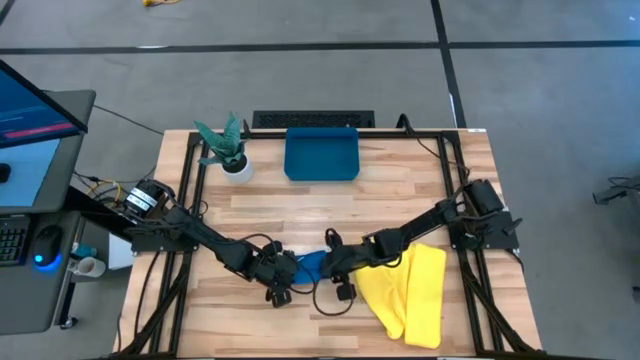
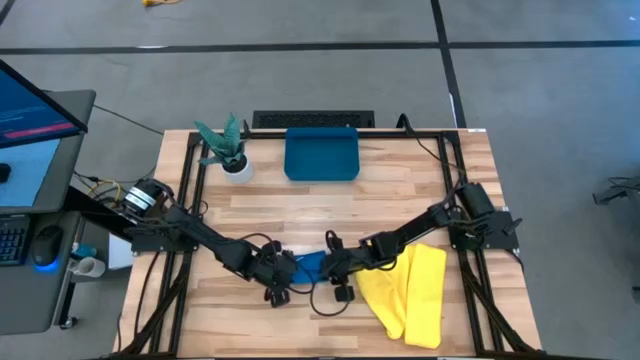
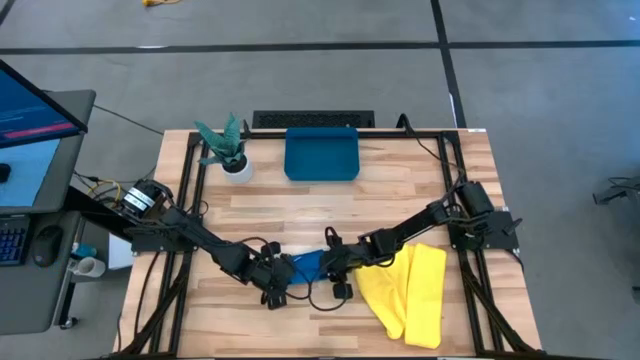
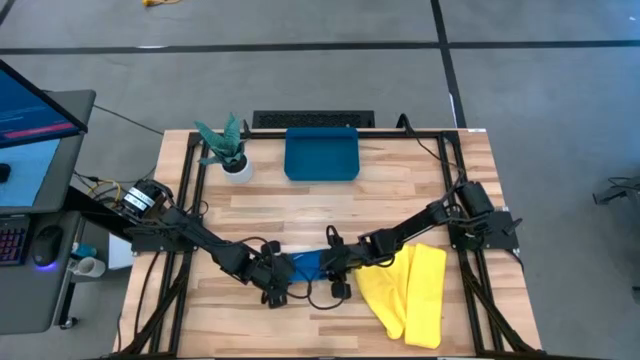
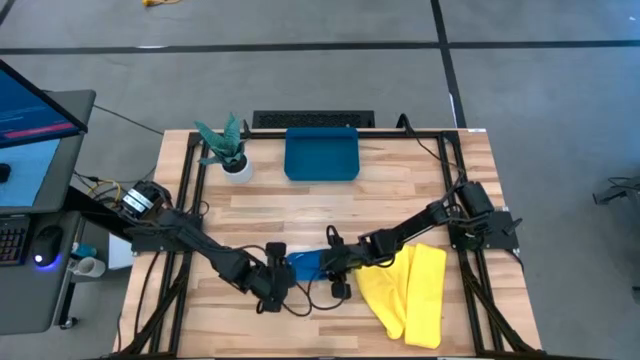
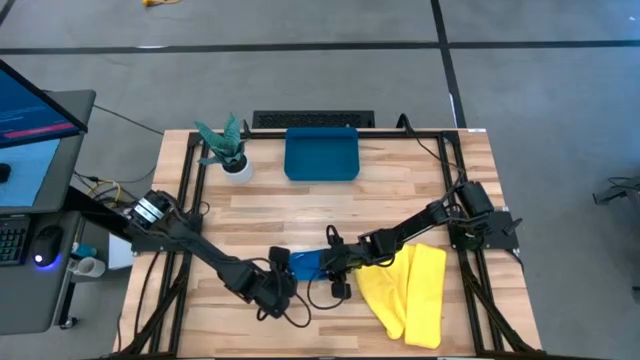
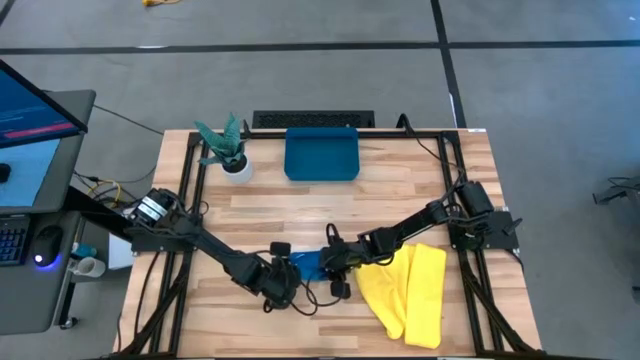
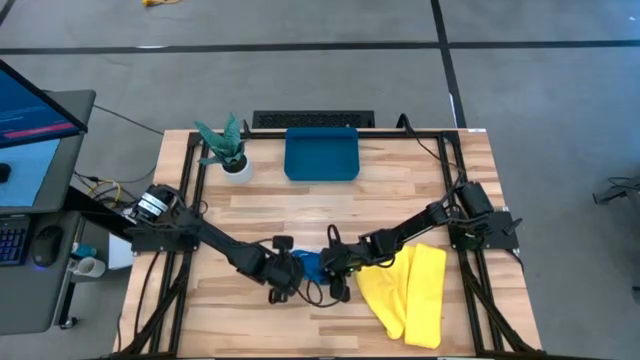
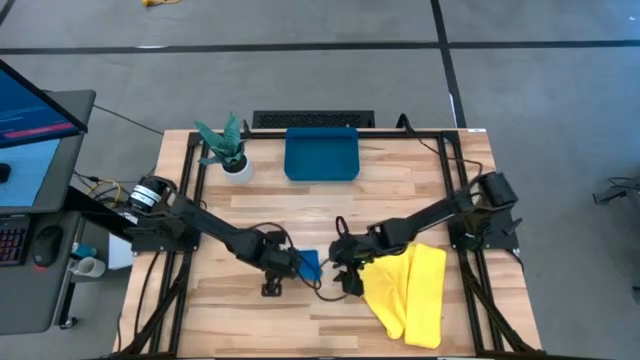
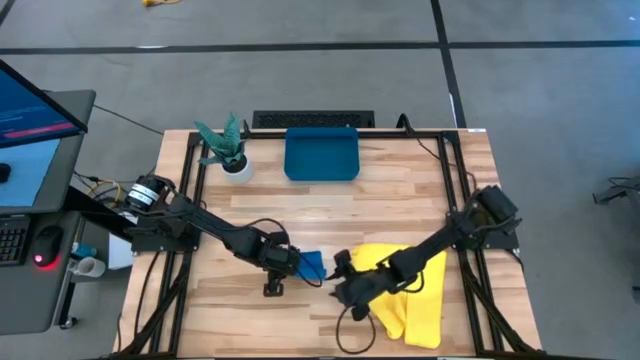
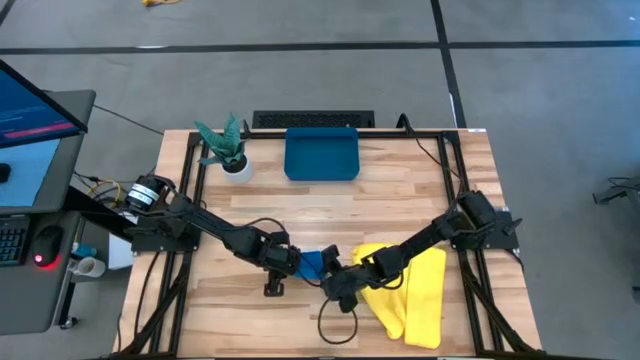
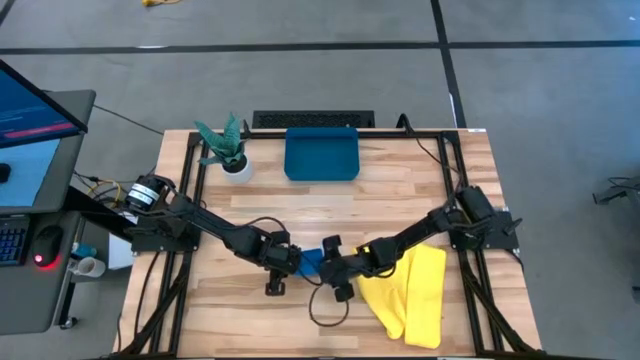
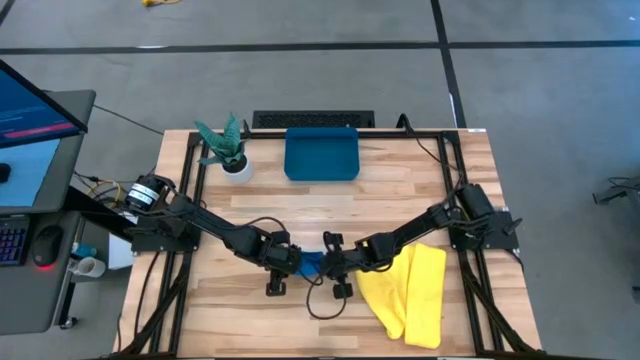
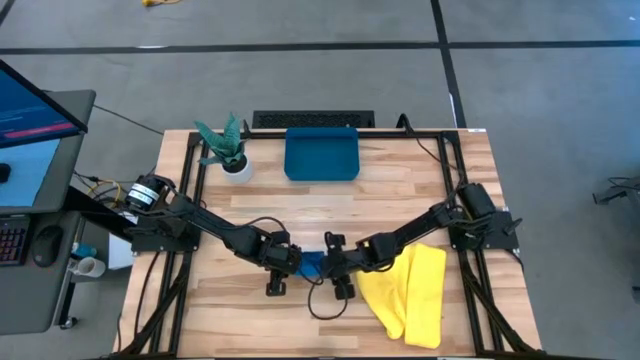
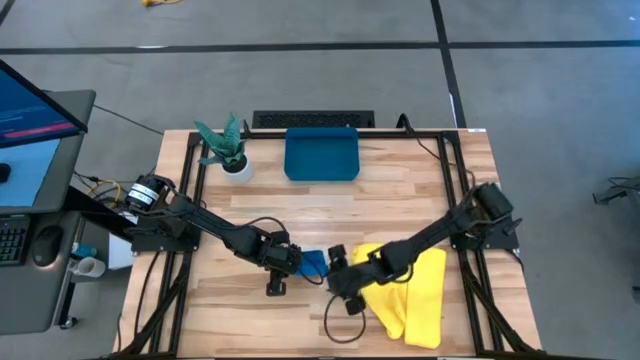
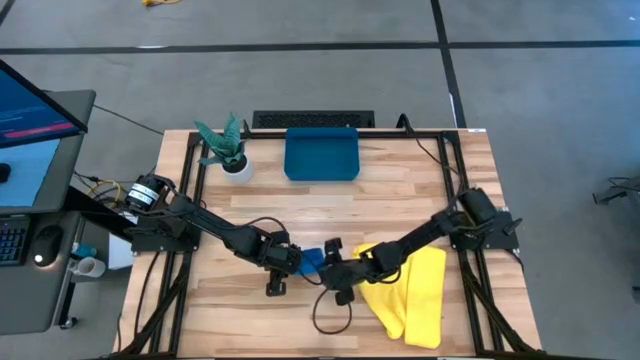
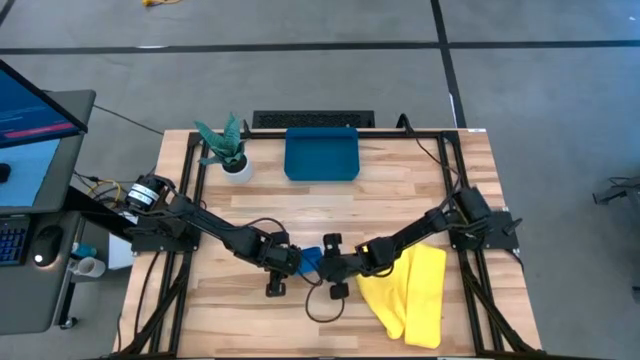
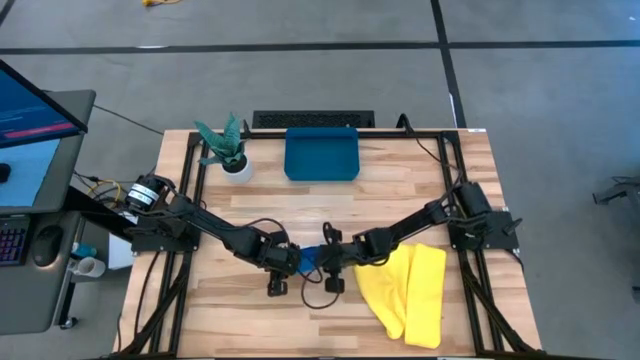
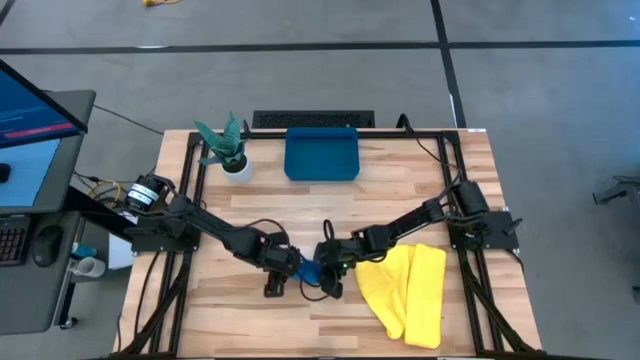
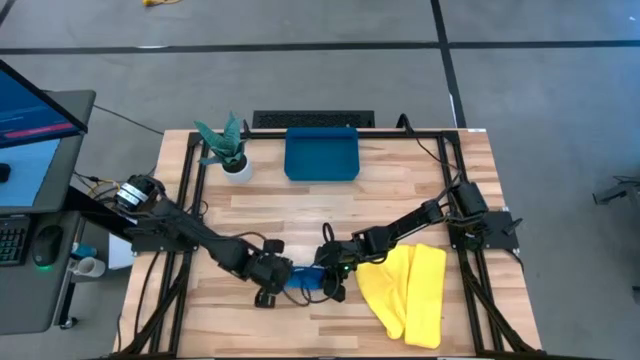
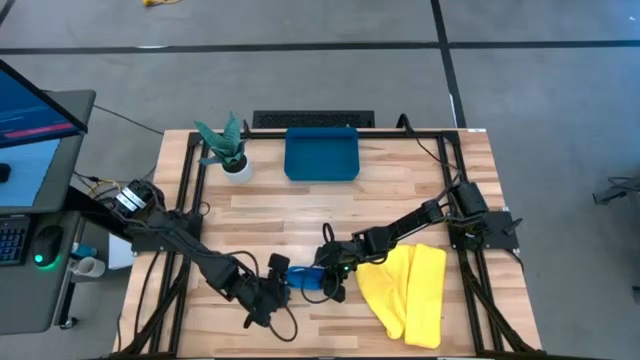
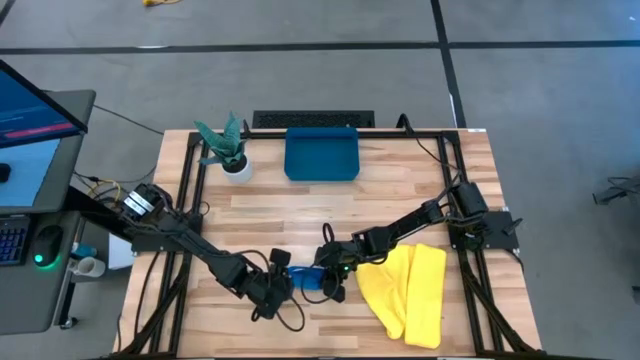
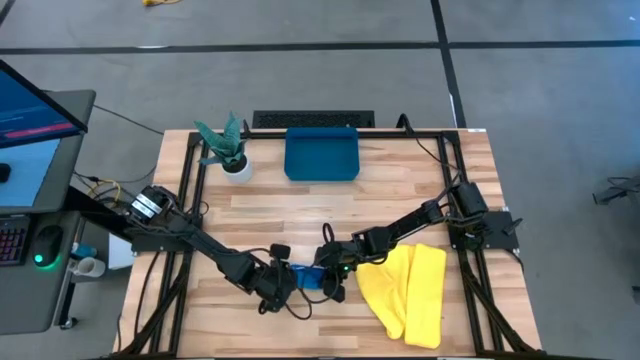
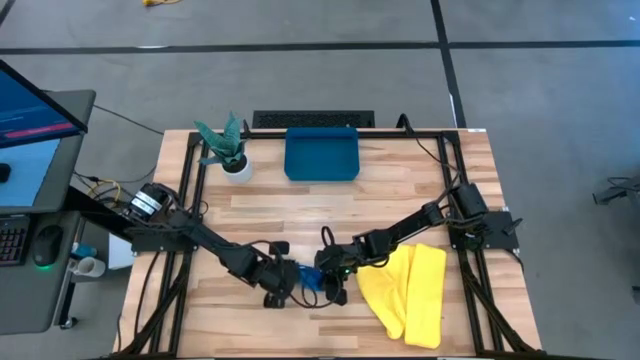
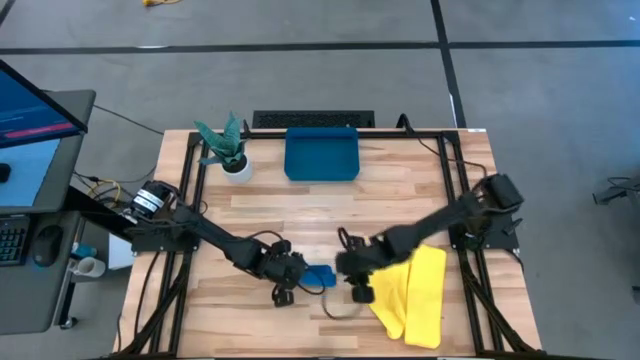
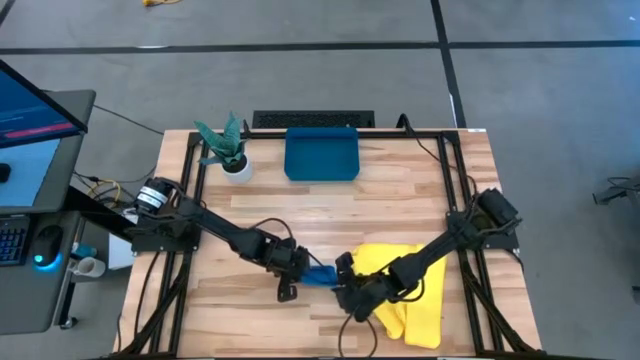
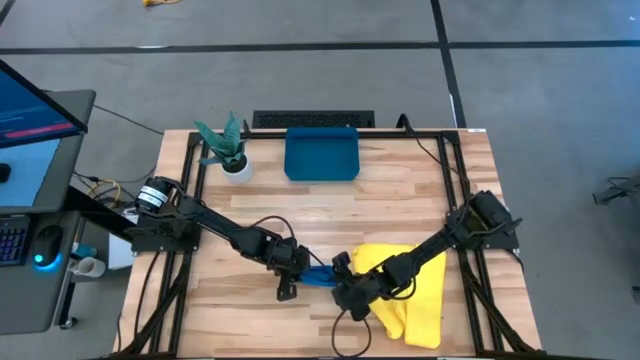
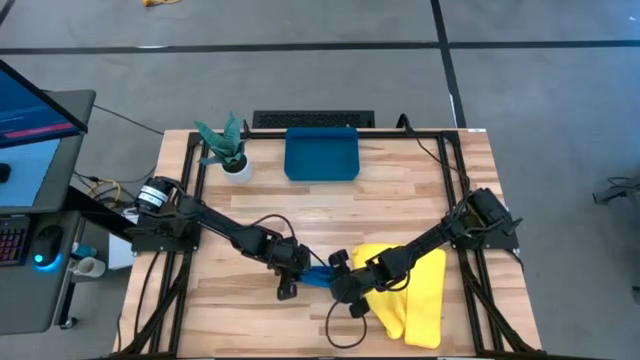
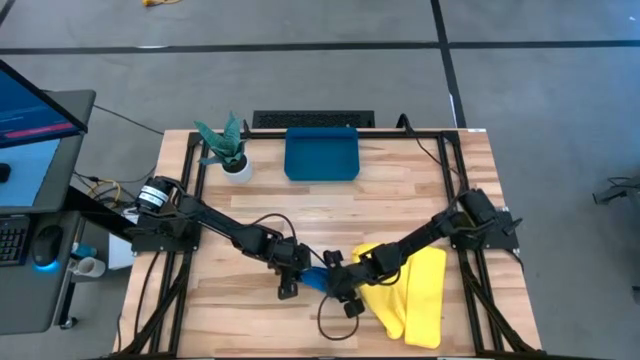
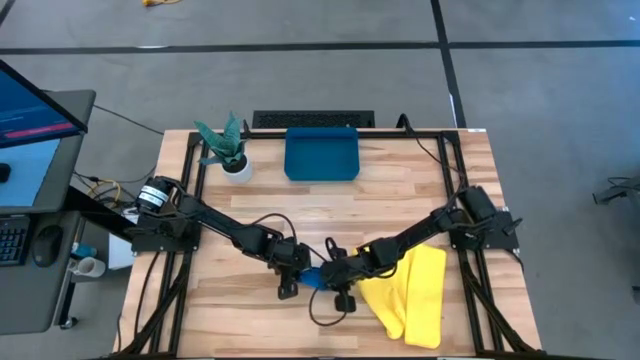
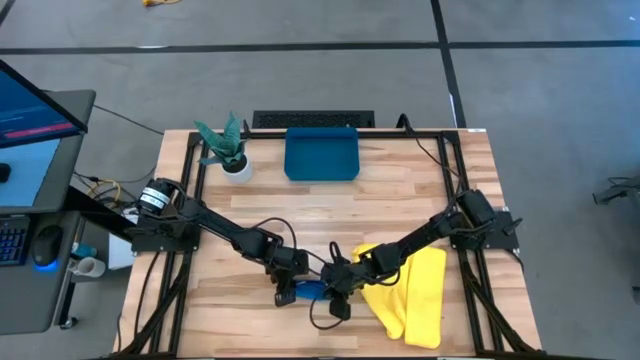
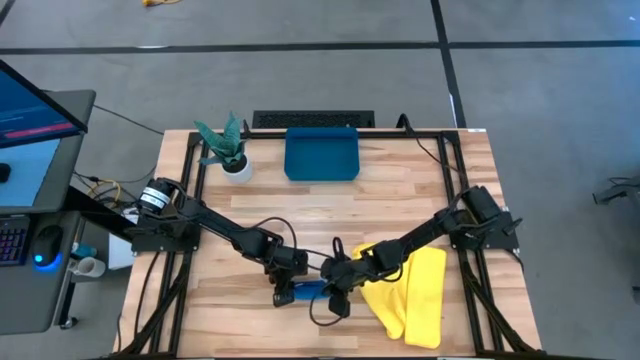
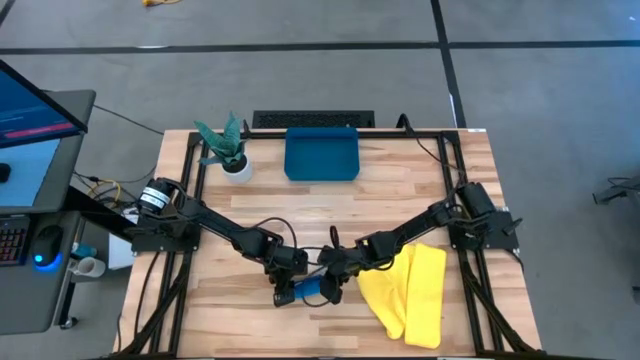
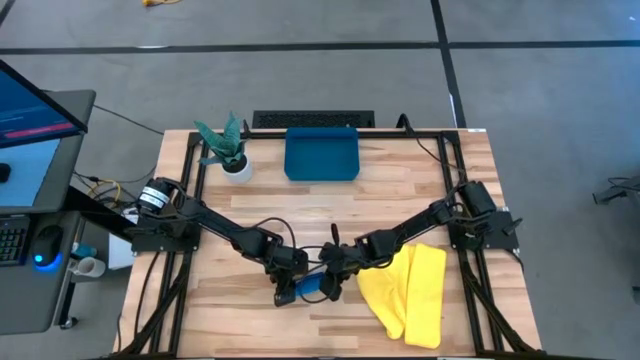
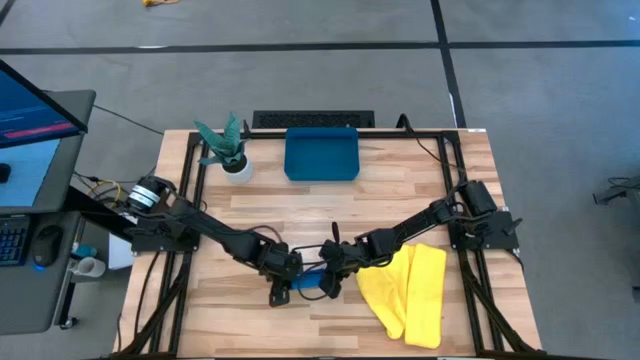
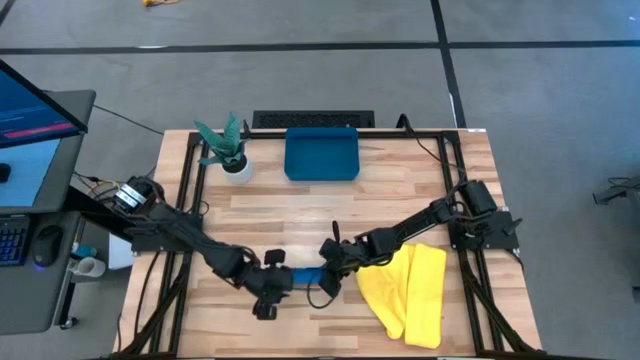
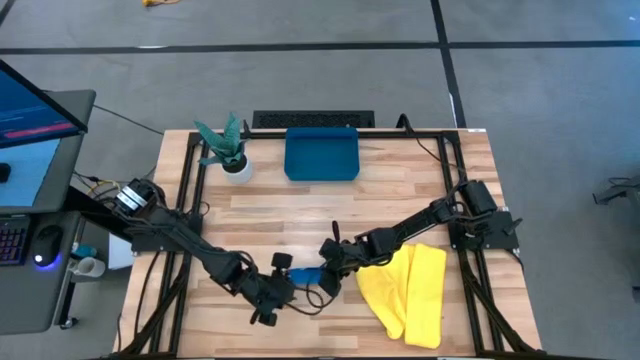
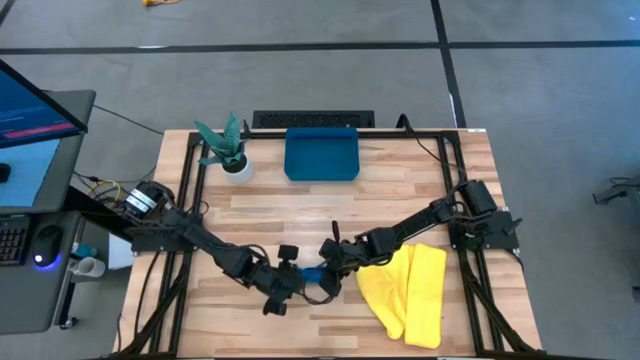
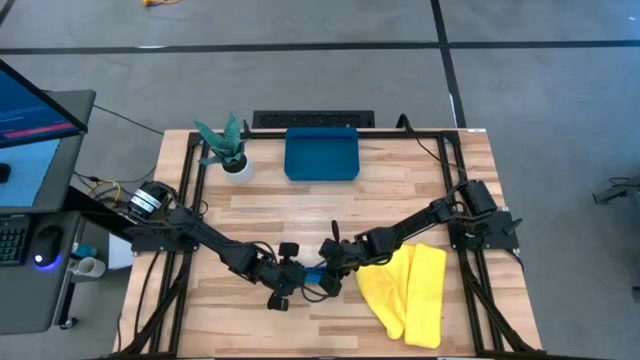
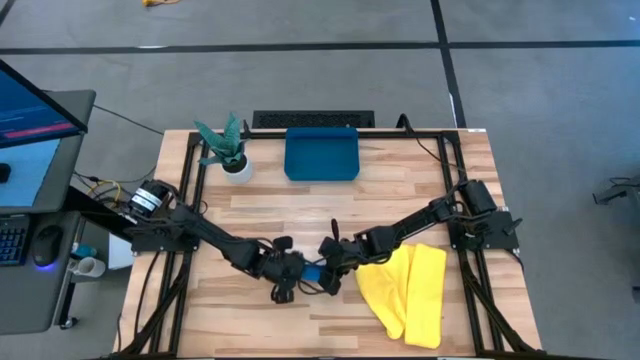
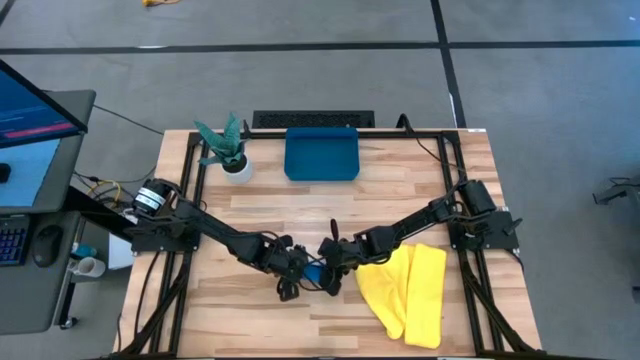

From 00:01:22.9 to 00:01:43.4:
Task: Roll microfiber towels into tight, uniform cylinder then place into a basket
Roll the blue microfiber towel
